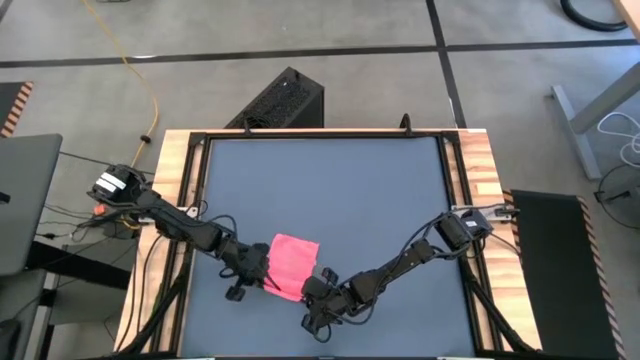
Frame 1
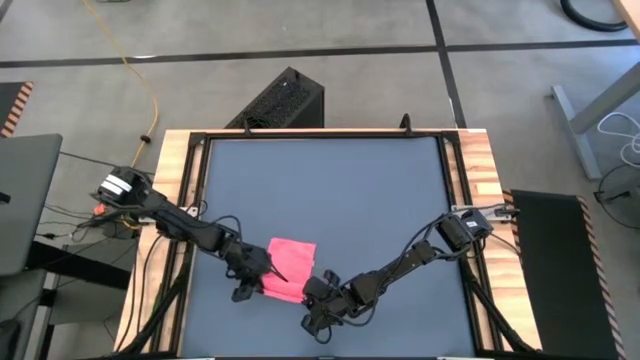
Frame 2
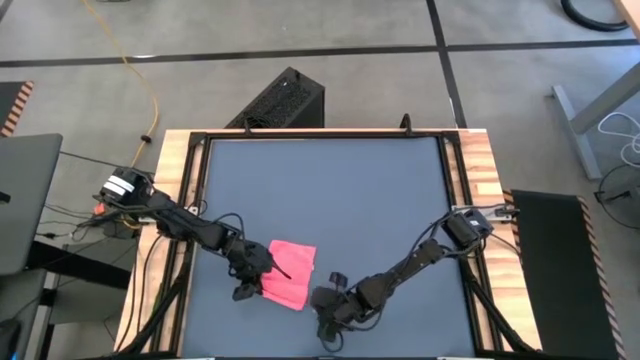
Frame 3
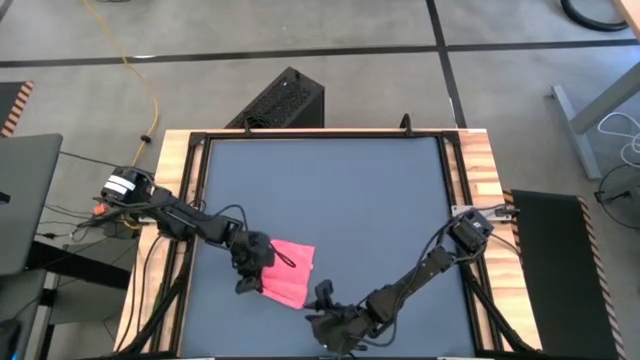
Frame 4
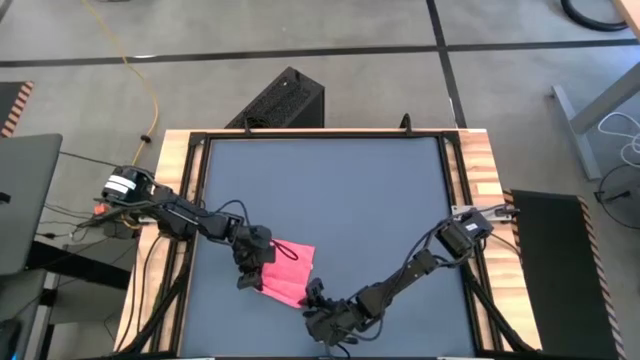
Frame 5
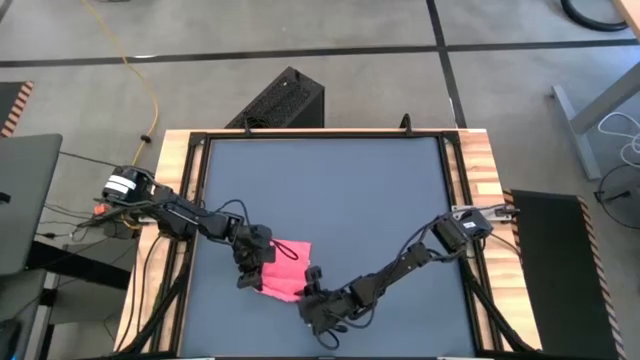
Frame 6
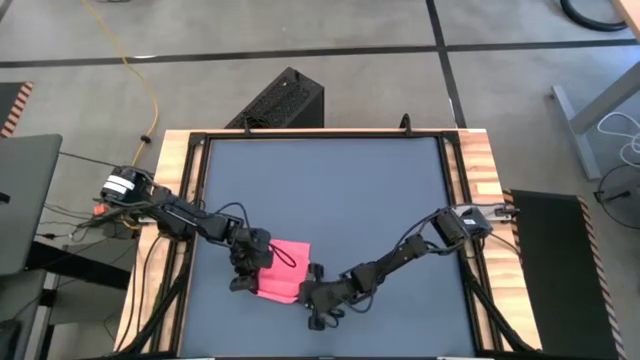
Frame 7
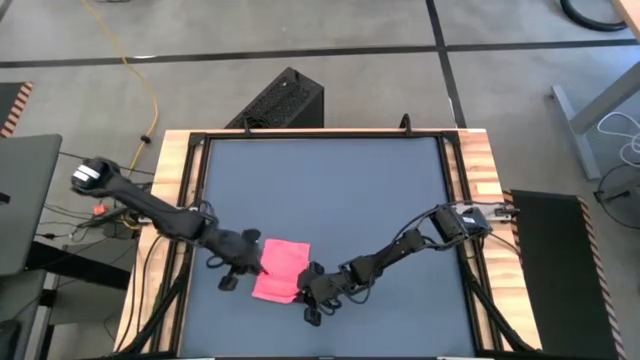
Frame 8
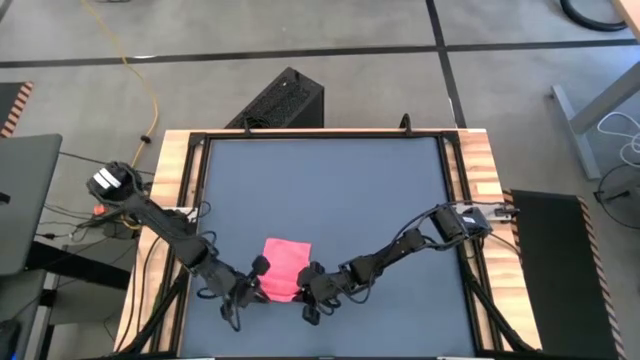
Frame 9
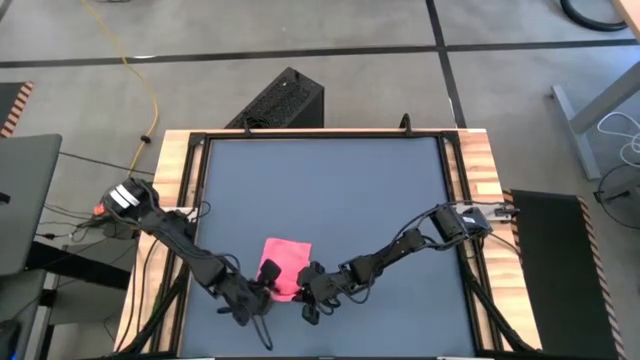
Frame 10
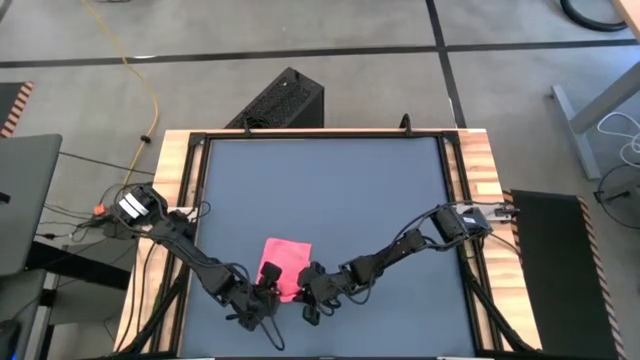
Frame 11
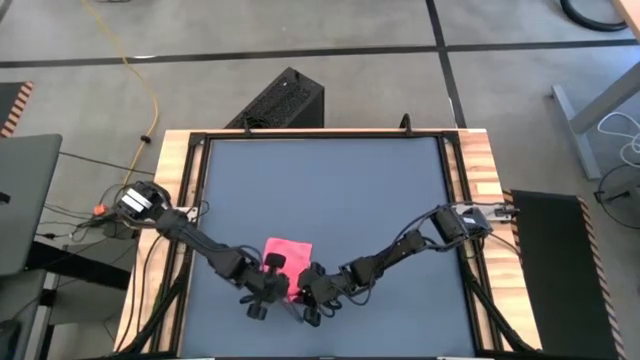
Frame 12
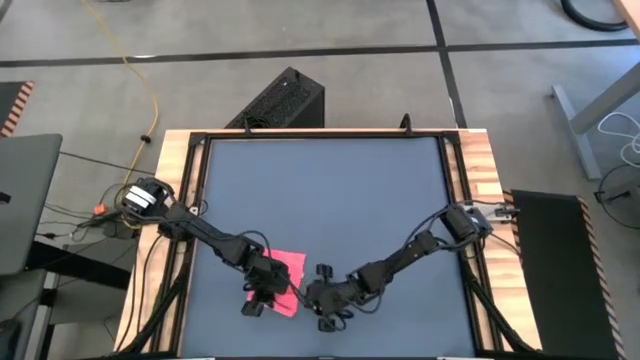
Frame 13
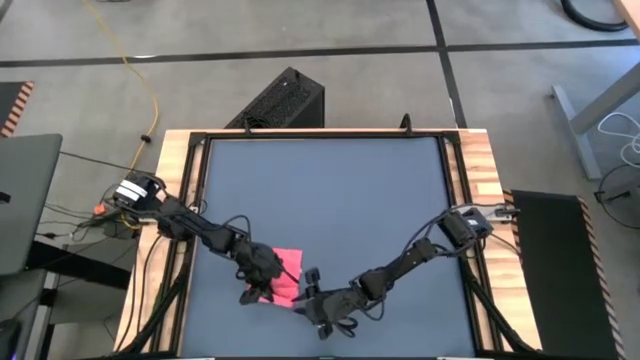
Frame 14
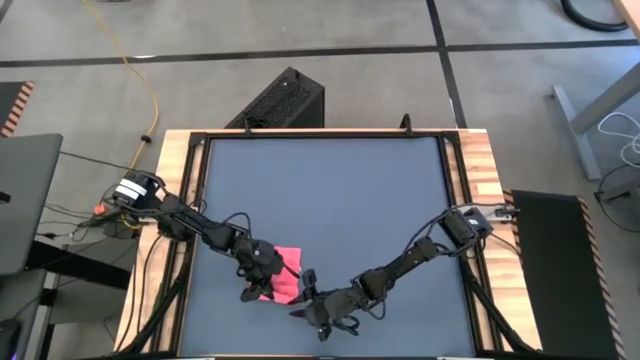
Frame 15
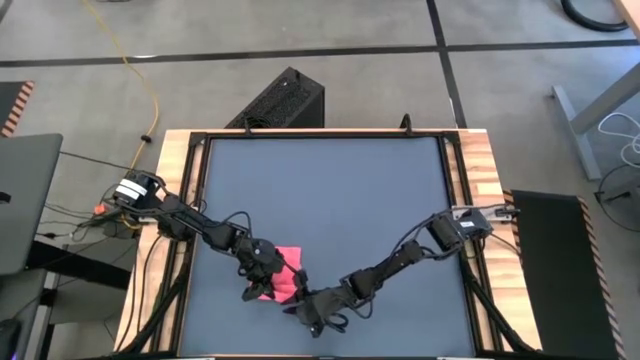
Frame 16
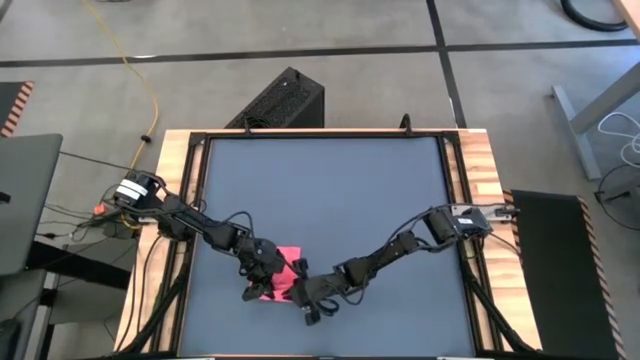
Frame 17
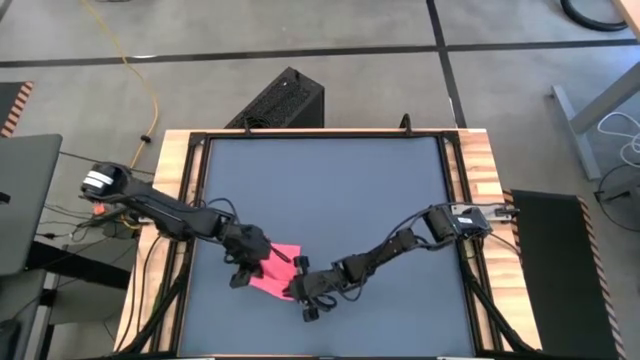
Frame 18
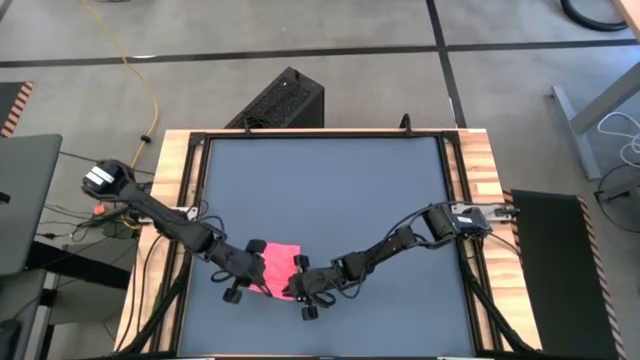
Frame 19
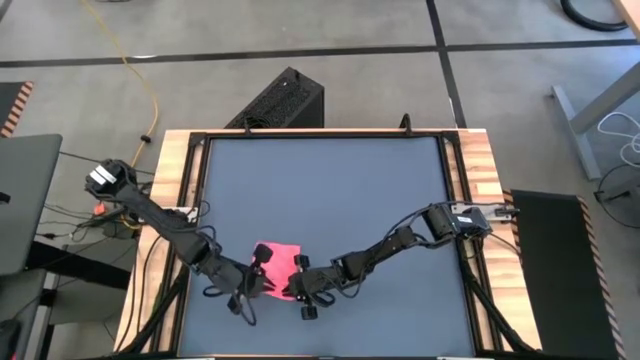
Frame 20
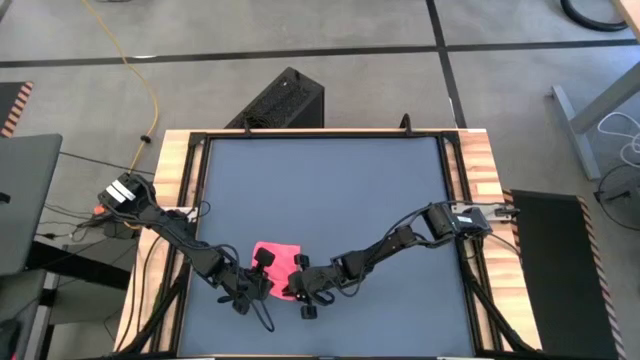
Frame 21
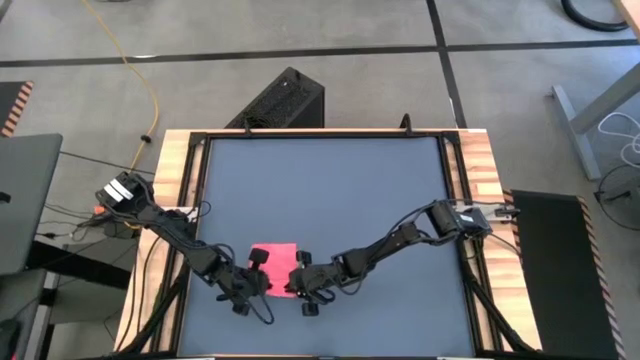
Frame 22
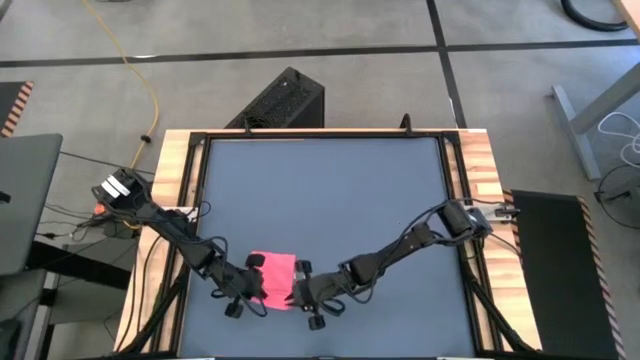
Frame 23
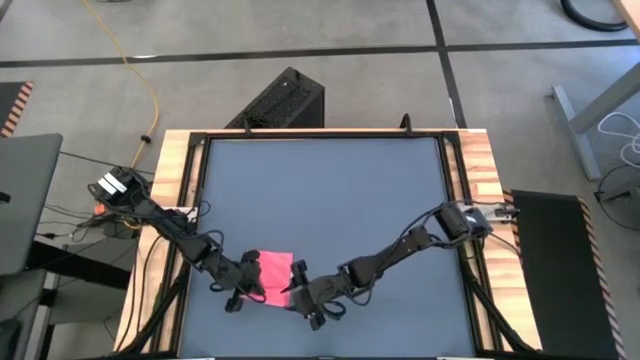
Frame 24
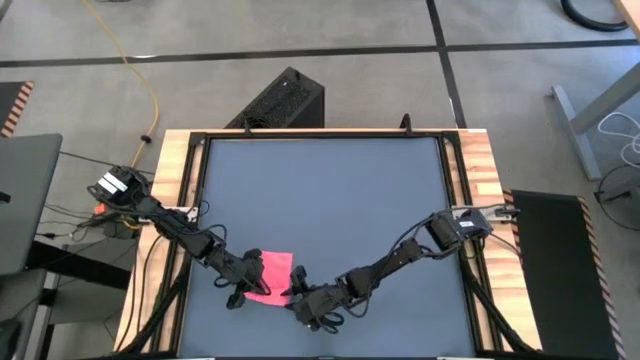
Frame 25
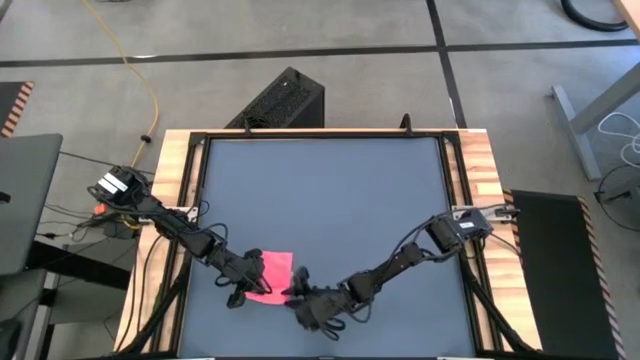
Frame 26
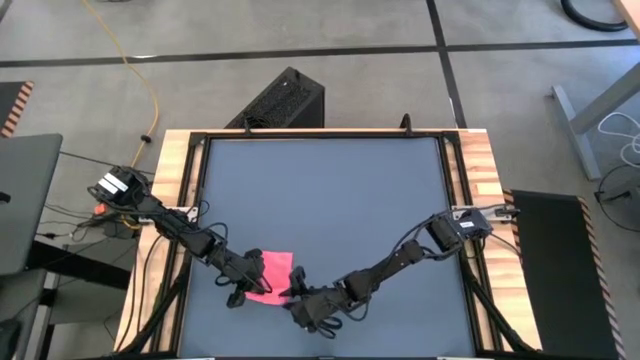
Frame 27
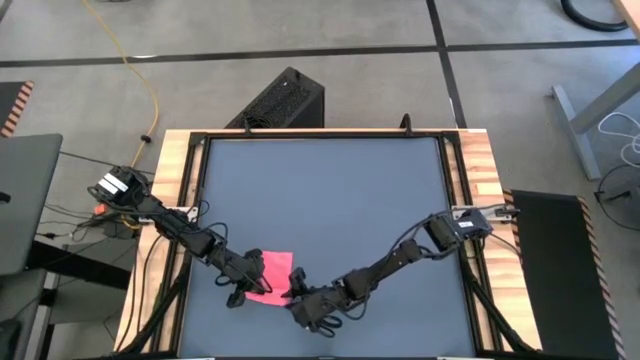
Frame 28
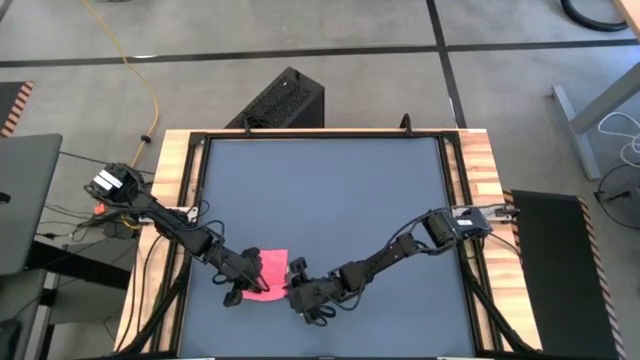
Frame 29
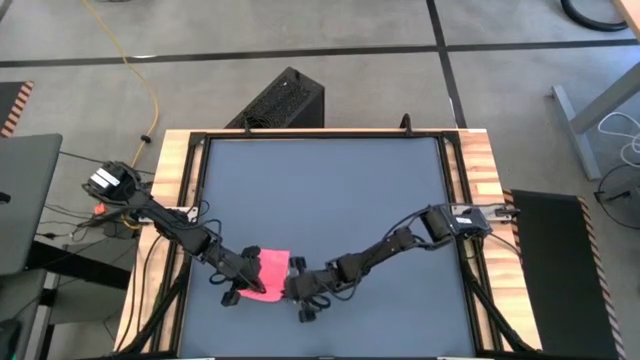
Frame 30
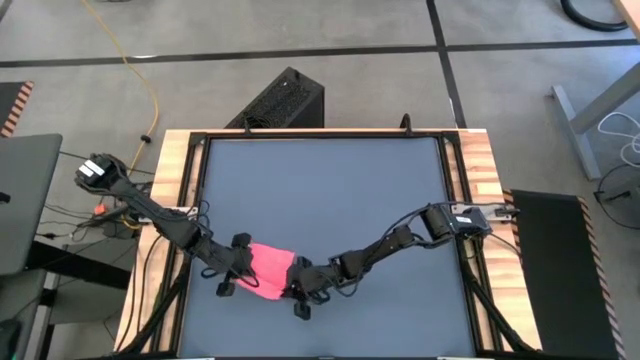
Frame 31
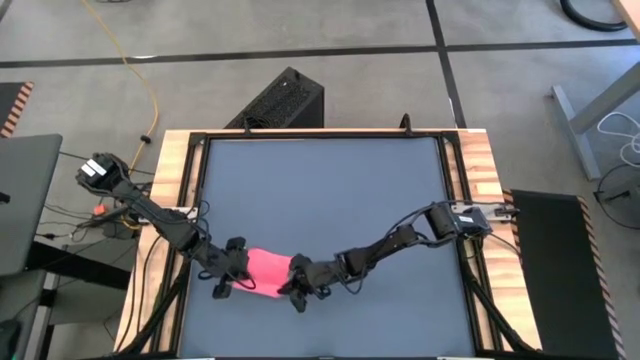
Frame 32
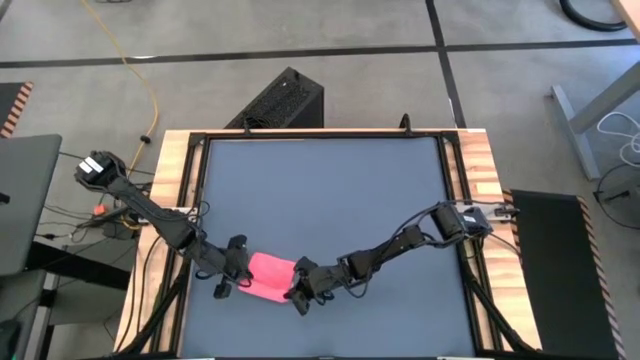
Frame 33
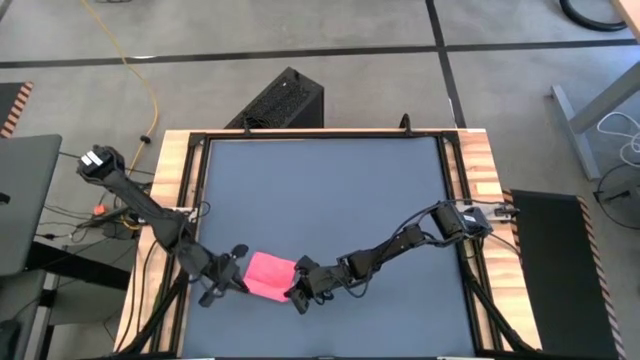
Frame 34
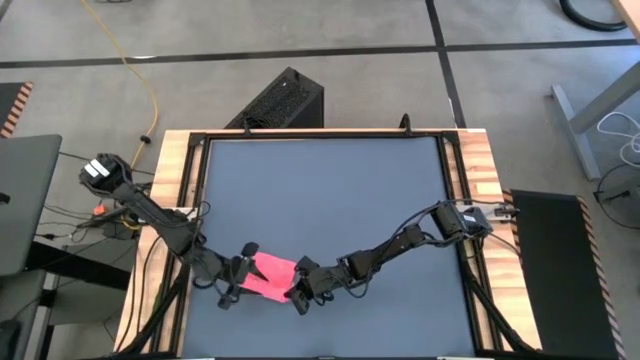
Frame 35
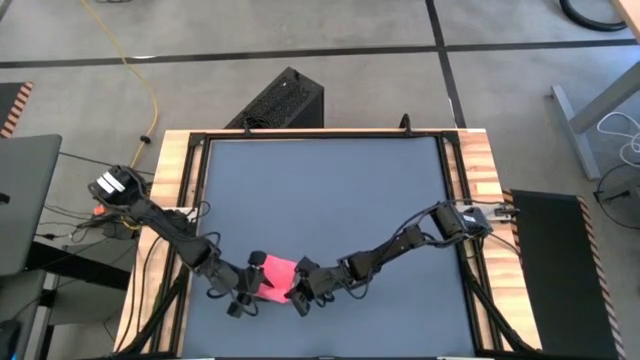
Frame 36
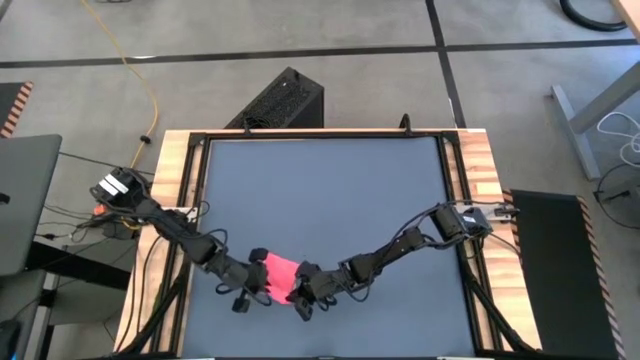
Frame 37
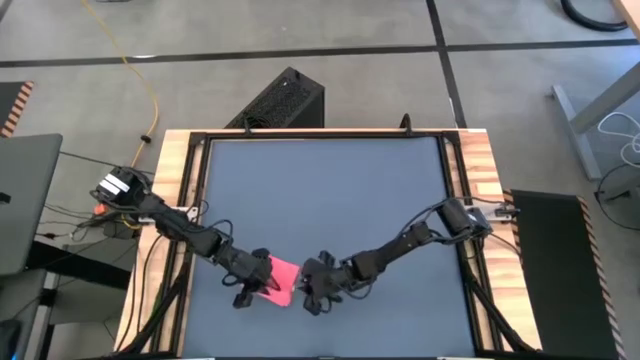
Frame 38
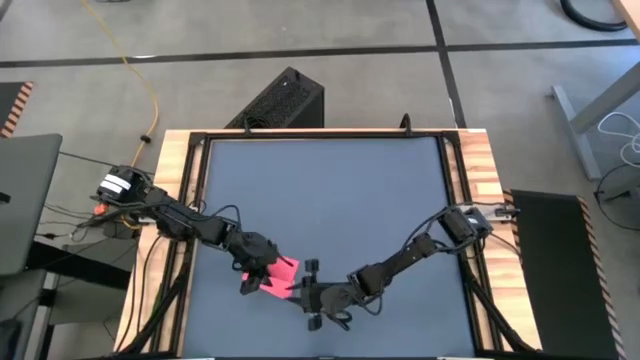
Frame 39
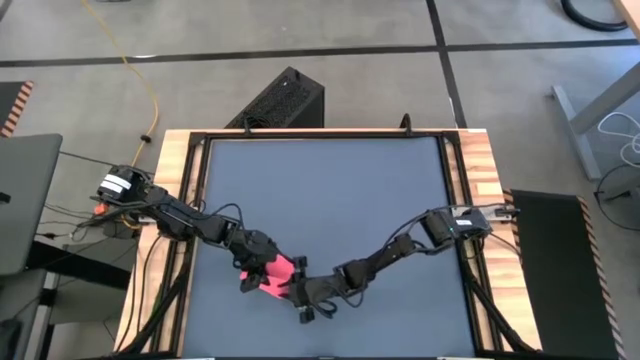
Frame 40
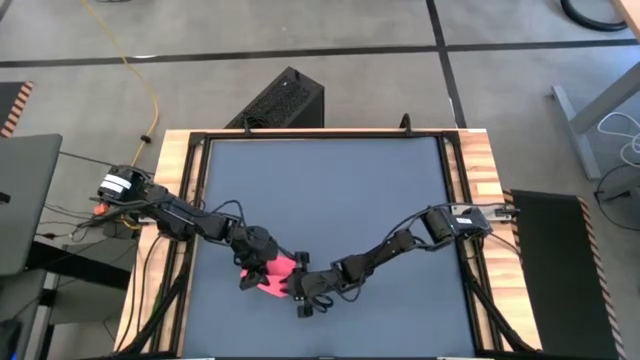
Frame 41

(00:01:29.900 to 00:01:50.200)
Task: Roll towel
Roll the pink microfiber towel
